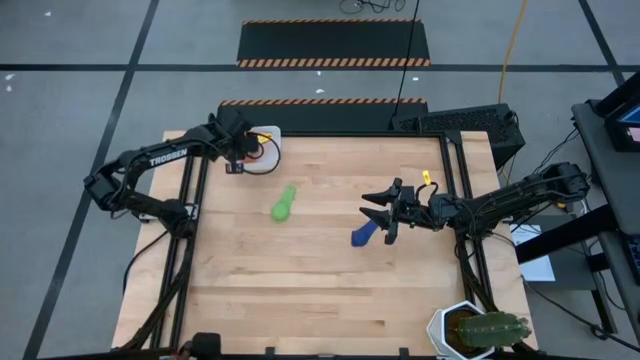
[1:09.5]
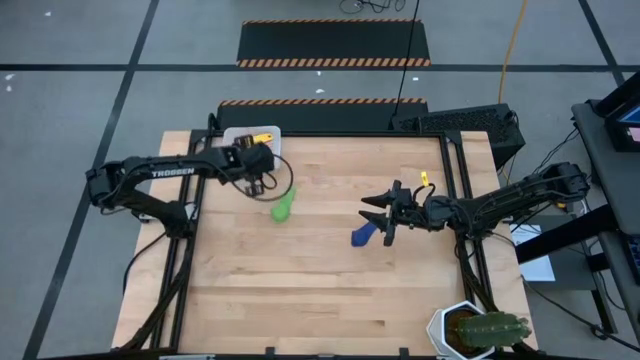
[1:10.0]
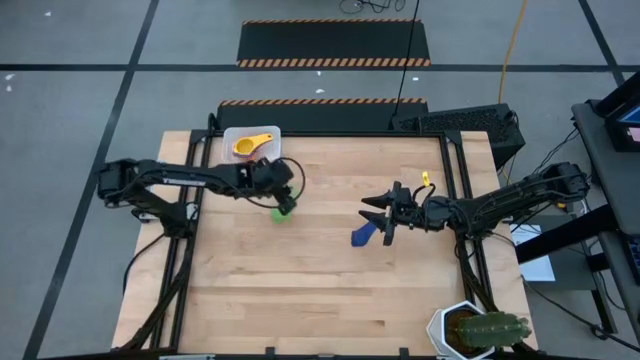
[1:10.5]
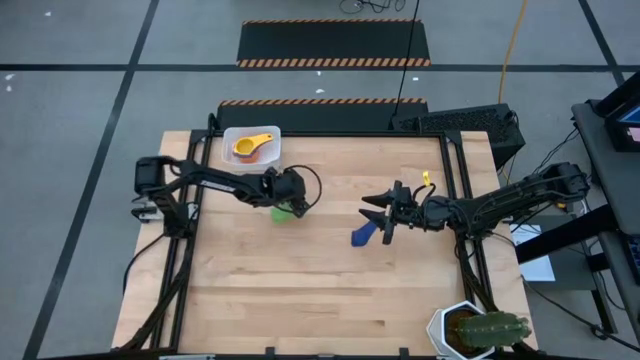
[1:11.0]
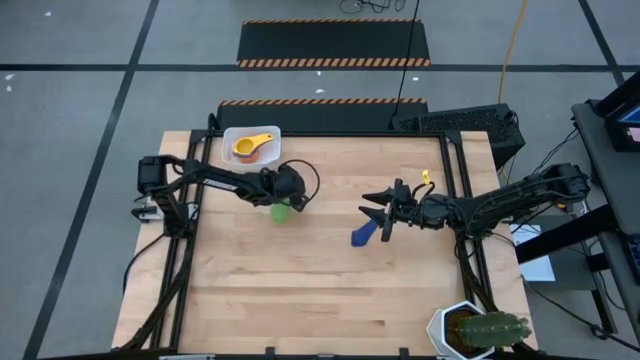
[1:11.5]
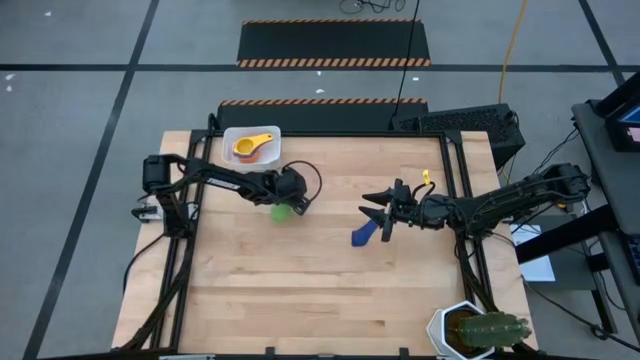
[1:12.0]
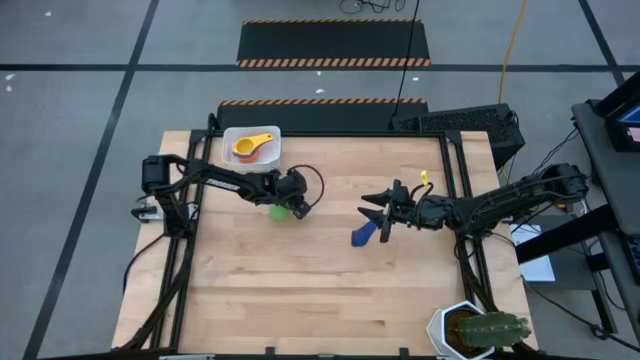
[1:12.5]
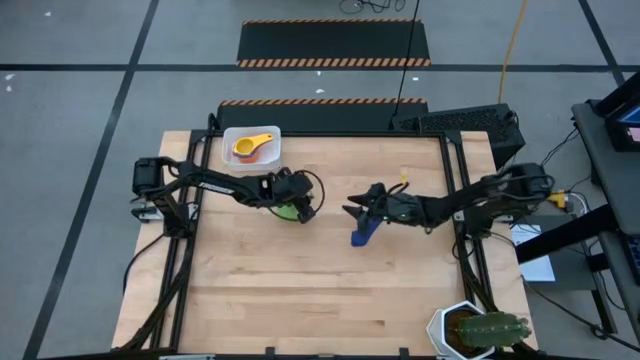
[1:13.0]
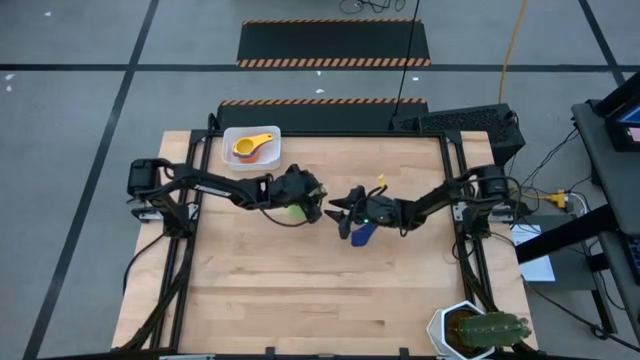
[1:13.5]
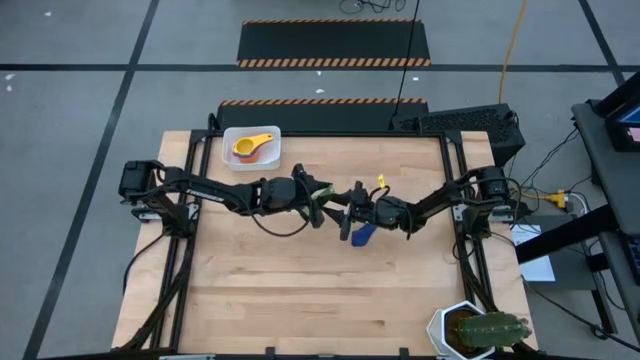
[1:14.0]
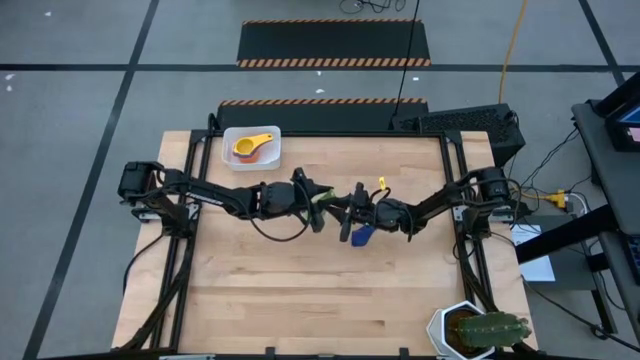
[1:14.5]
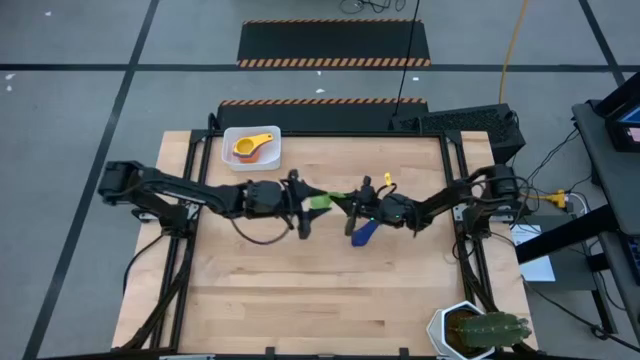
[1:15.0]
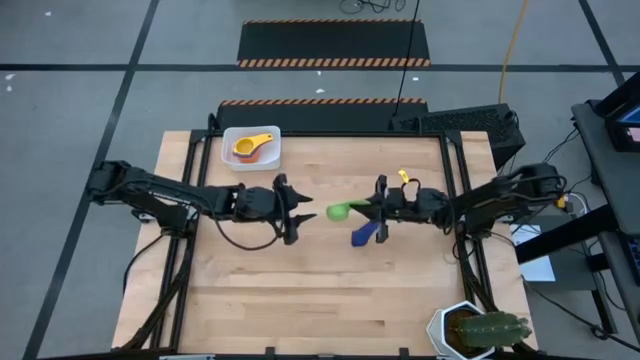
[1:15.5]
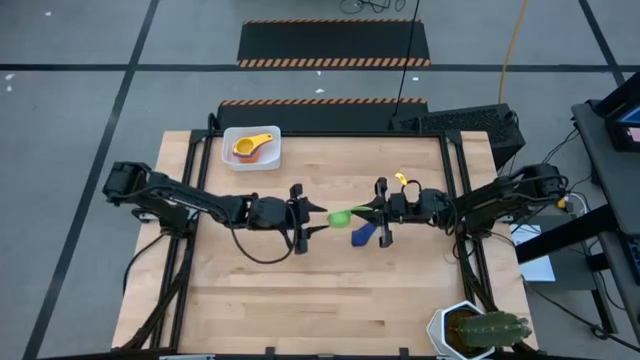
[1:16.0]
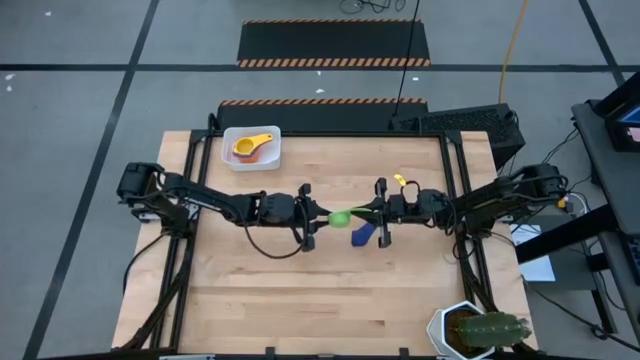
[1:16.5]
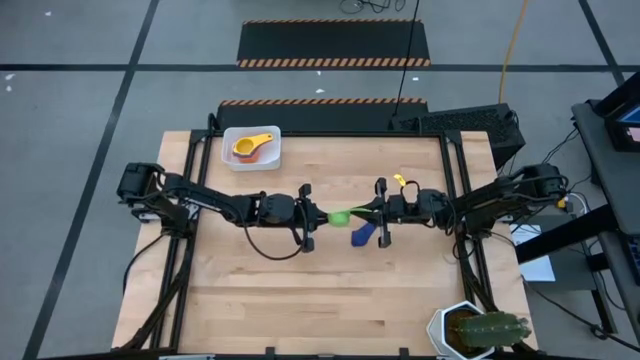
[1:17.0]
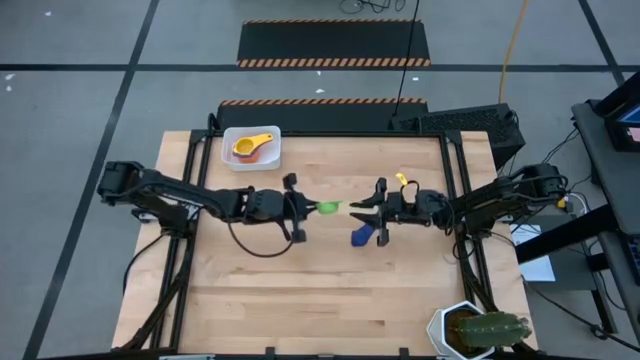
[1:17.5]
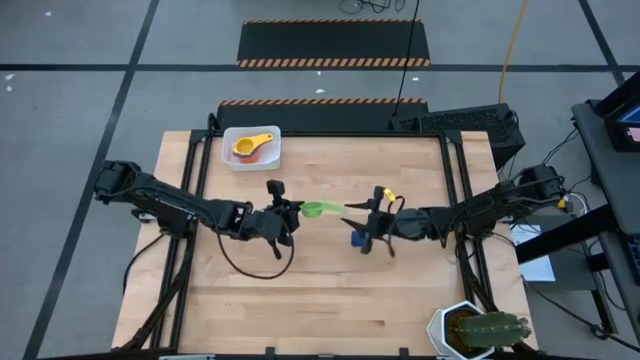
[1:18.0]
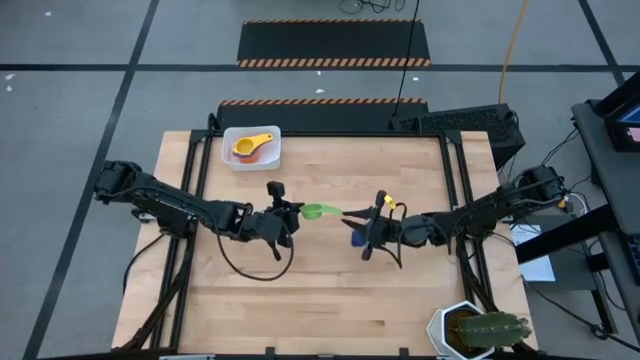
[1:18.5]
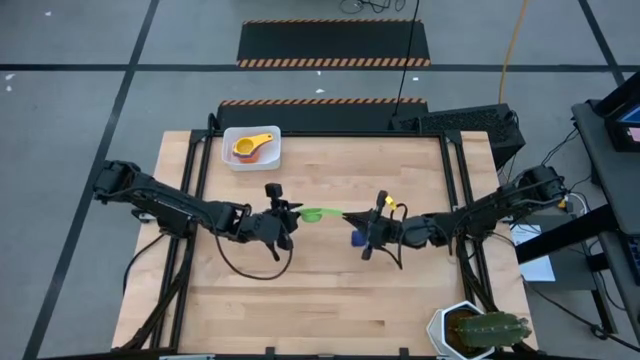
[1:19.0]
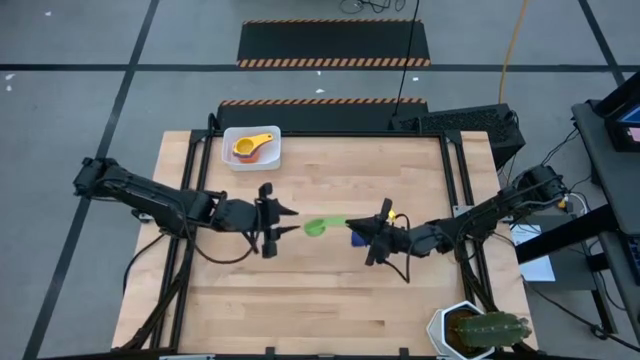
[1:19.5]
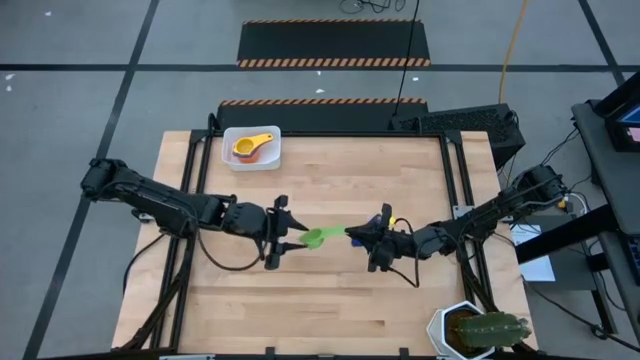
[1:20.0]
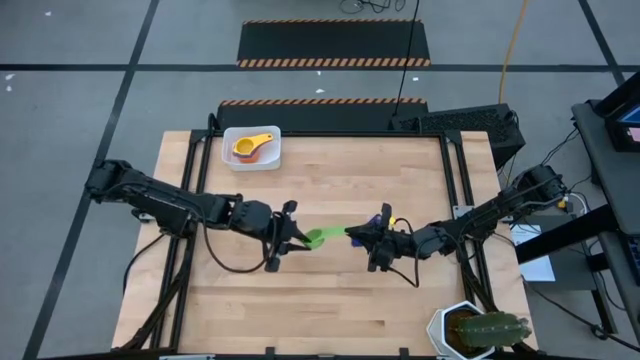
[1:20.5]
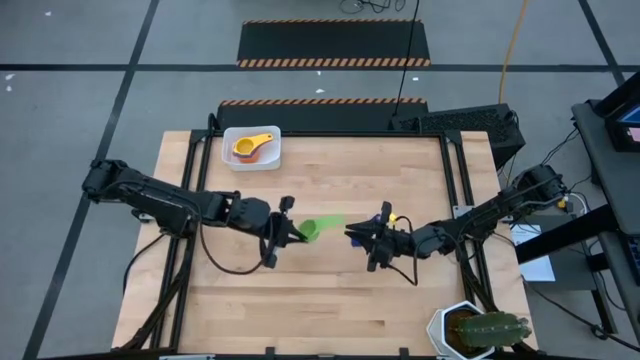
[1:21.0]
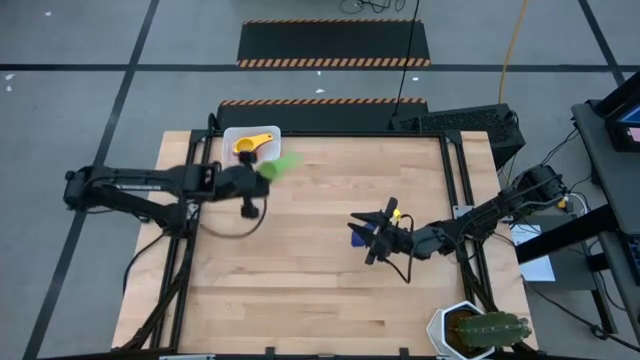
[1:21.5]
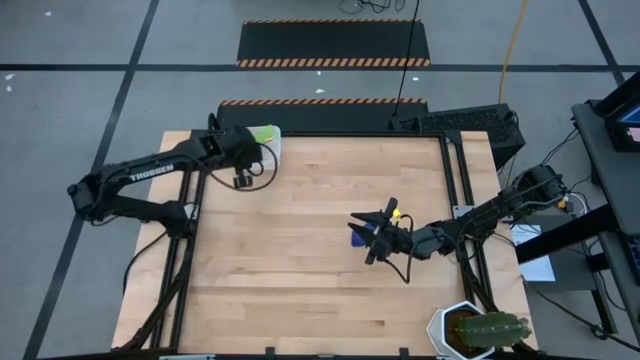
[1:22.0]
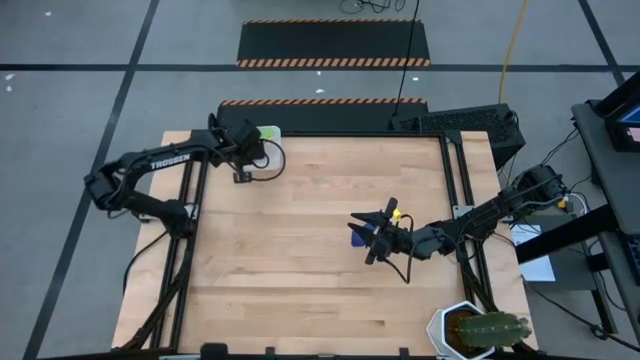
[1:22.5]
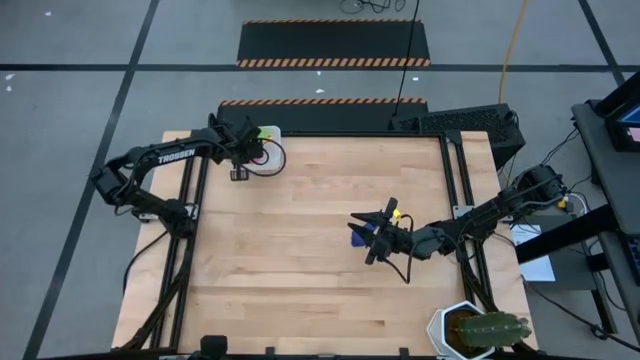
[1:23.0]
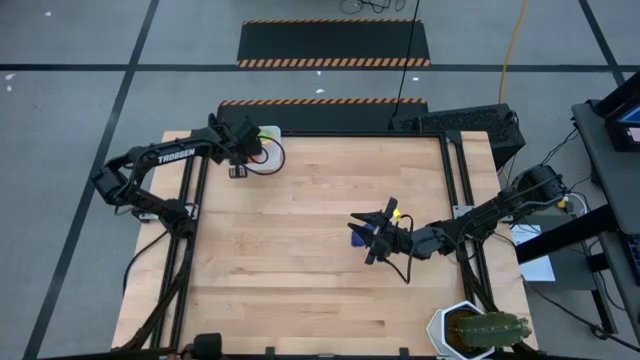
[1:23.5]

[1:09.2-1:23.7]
Task: Nest measuring cups in basket
Stack the green measuring cup into the yellow measuring cup

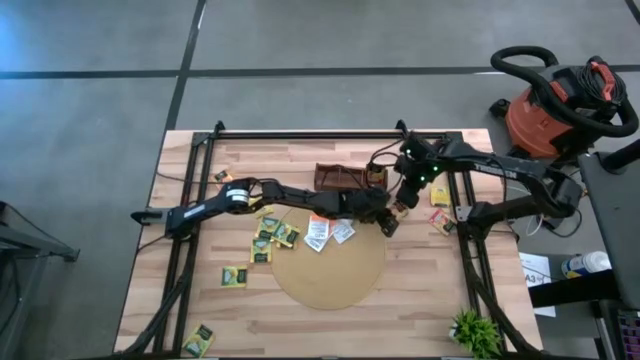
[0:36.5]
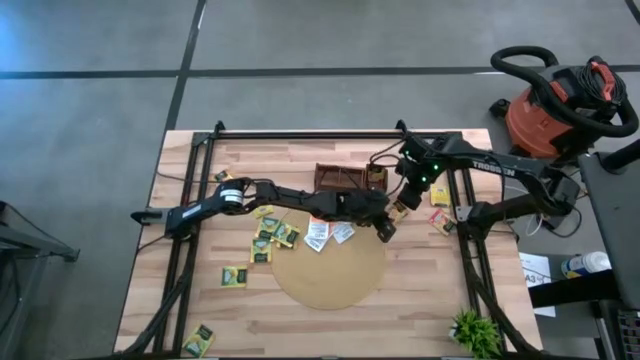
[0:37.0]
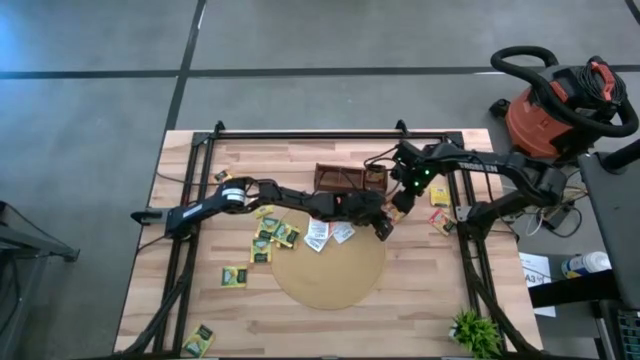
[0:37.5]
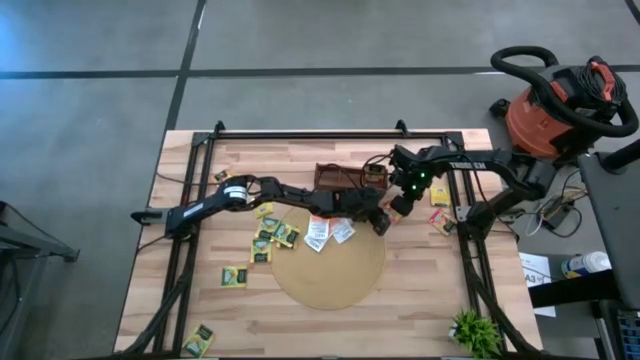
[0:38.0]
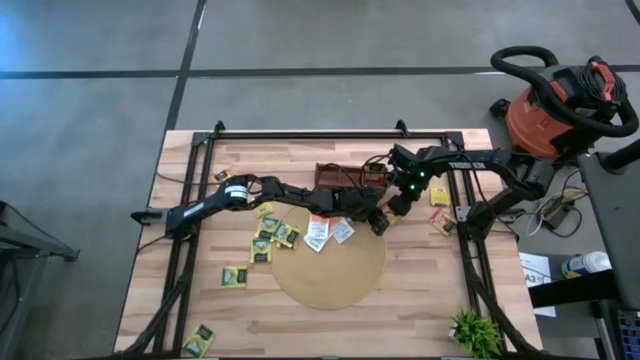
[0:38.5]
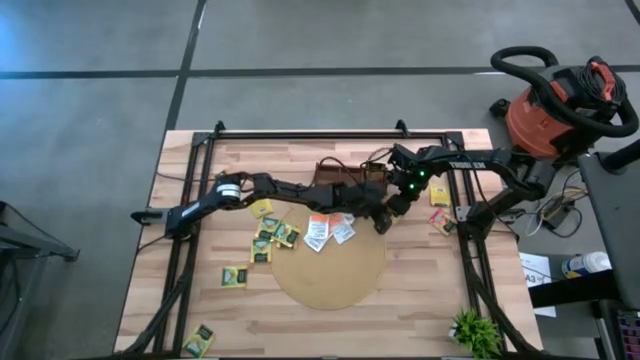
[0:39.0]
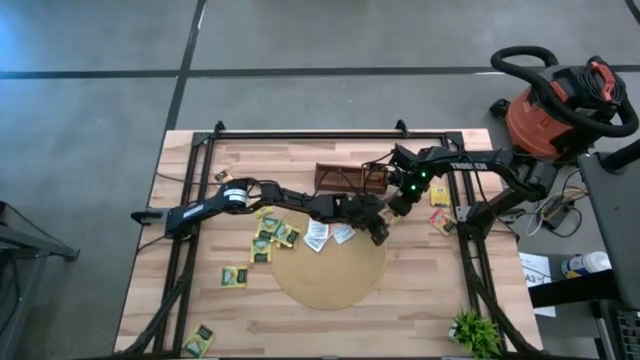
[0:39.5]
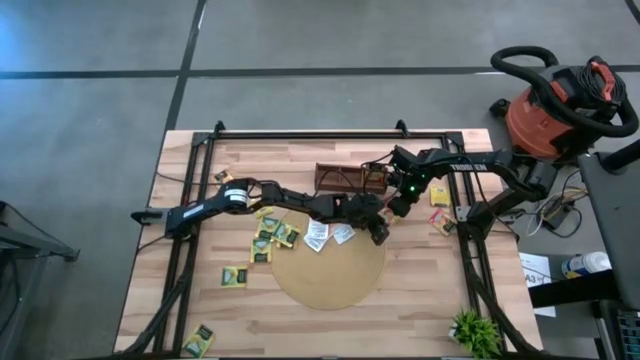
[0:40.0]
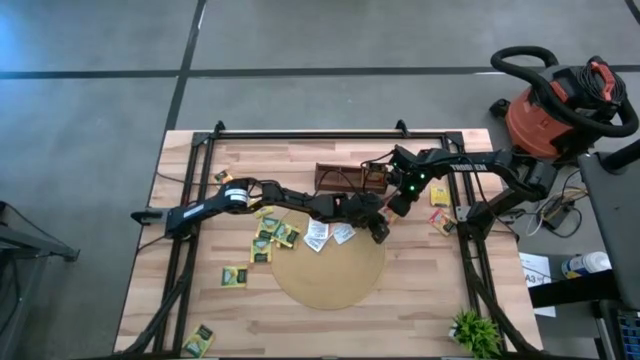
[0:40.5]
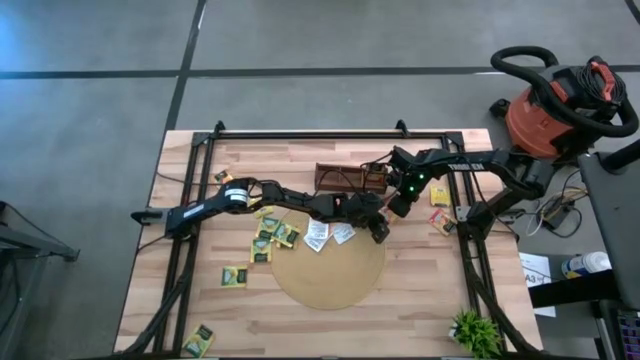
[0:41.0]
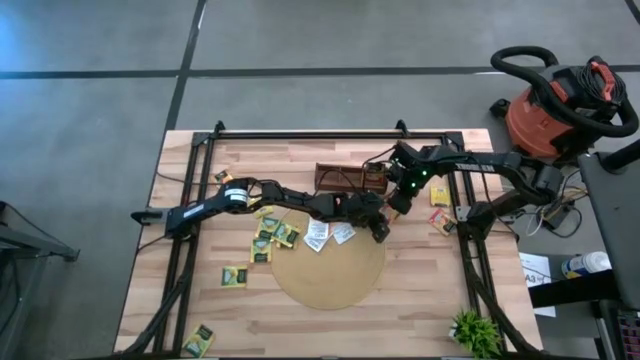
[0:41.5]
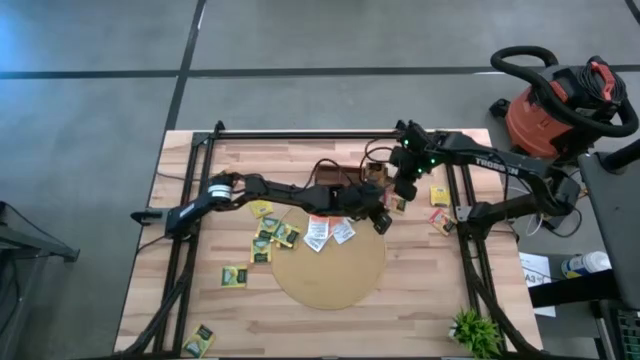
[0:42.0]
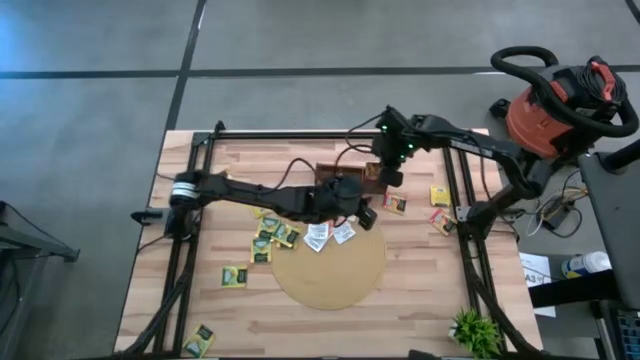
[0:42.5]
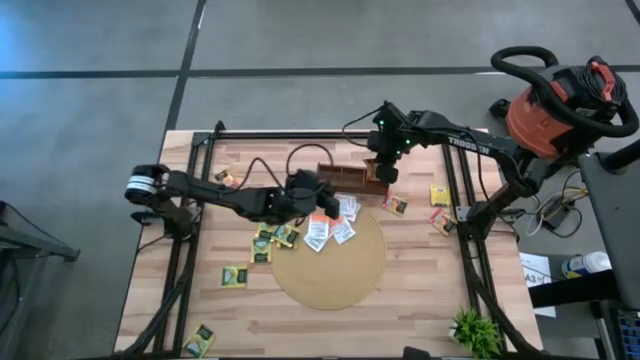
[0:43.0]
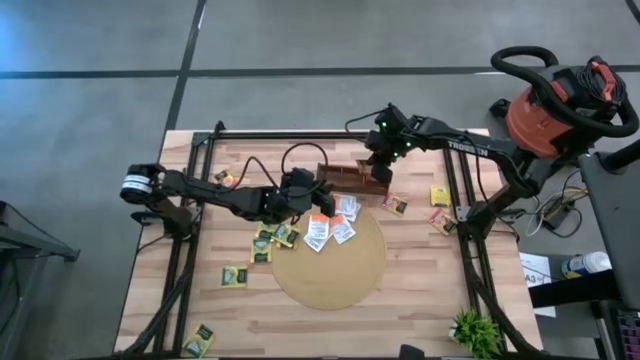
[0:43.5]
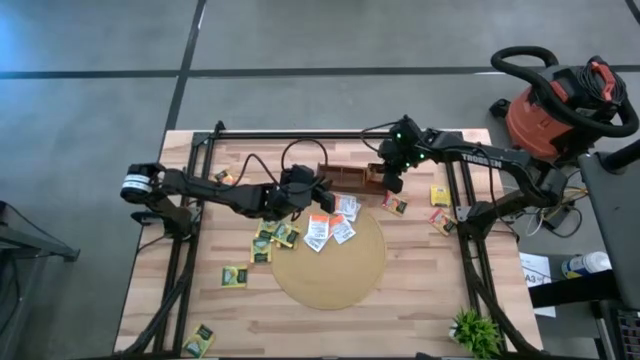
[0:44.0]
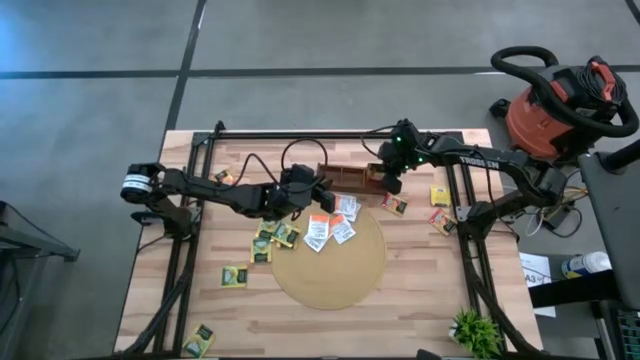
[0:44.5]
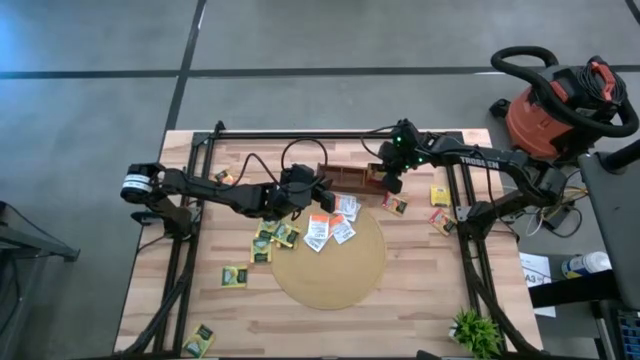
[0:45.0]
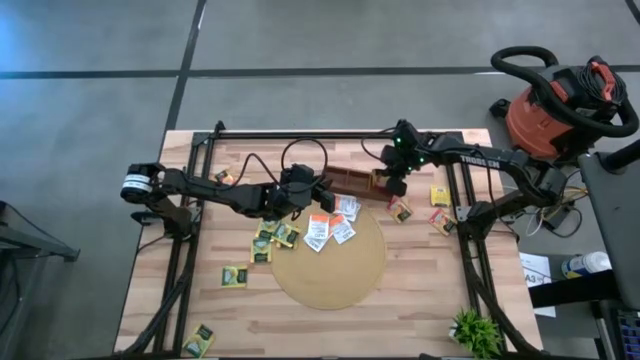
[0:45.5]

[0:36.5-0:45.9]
Task: Pick & Place Tea
Put the mango tea bag into the right section of the wooden organizer
